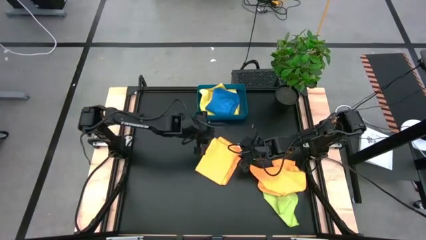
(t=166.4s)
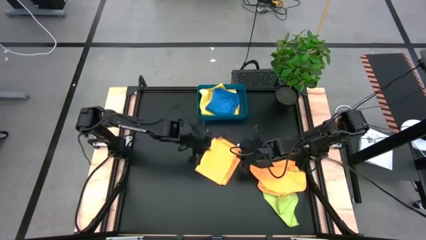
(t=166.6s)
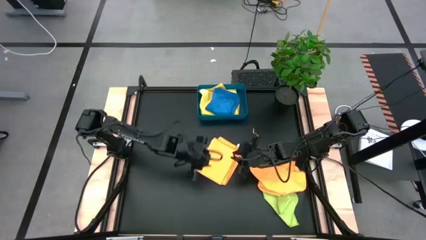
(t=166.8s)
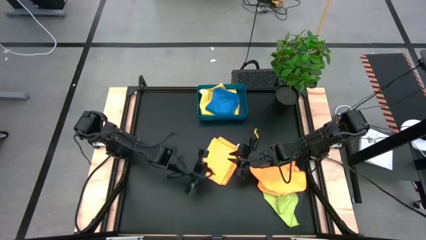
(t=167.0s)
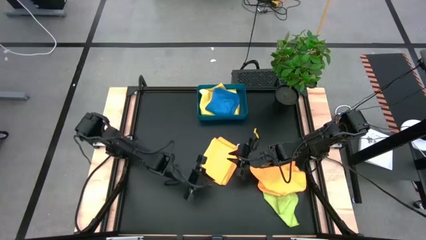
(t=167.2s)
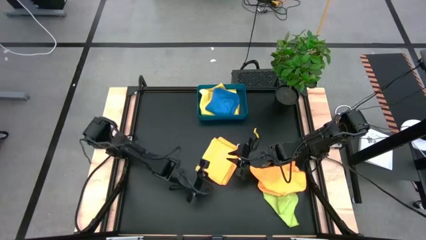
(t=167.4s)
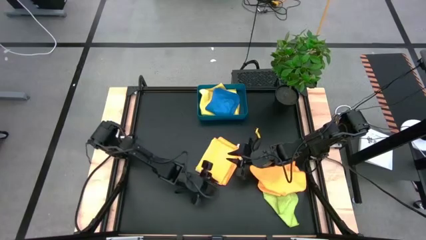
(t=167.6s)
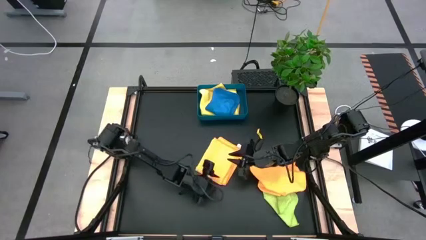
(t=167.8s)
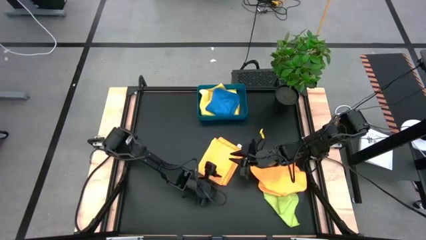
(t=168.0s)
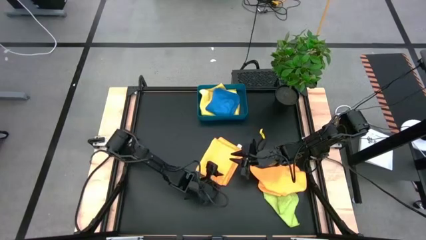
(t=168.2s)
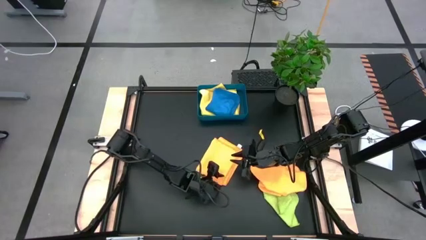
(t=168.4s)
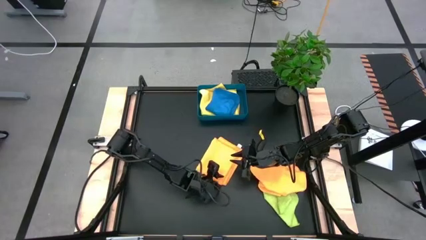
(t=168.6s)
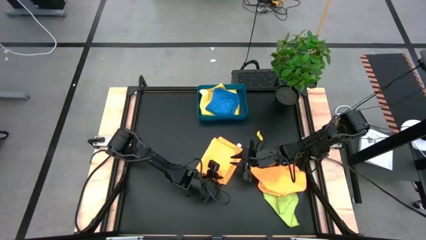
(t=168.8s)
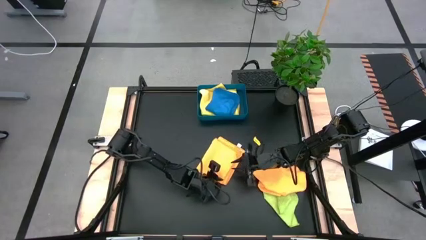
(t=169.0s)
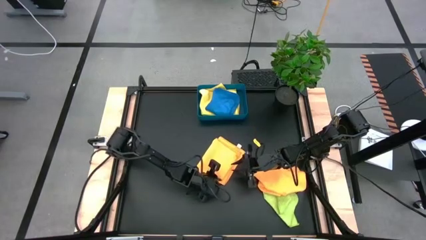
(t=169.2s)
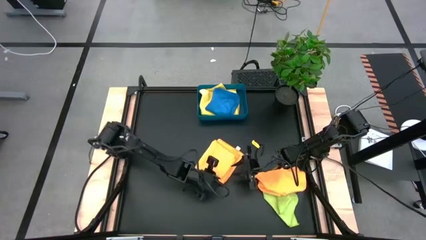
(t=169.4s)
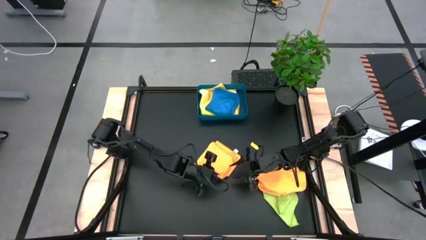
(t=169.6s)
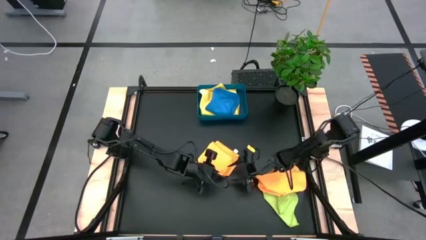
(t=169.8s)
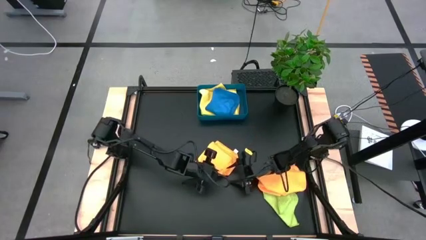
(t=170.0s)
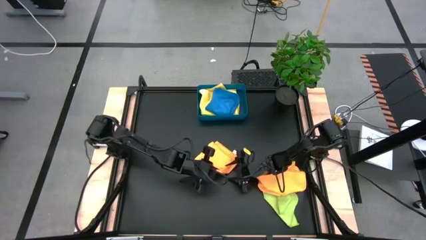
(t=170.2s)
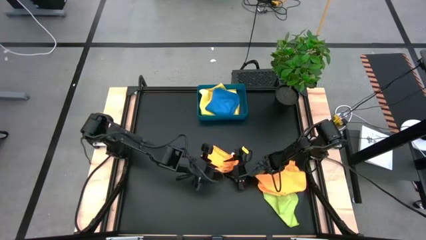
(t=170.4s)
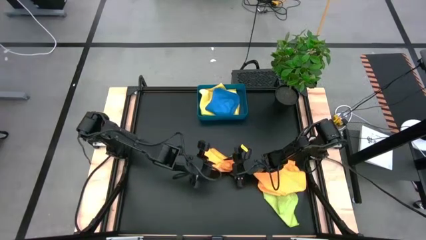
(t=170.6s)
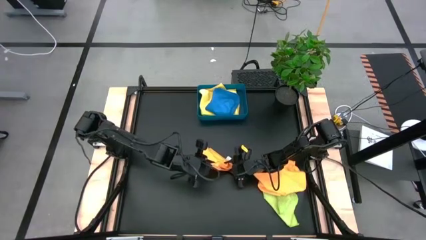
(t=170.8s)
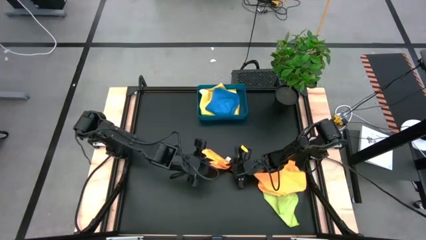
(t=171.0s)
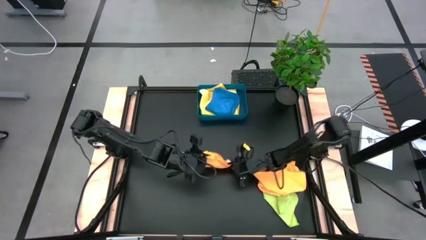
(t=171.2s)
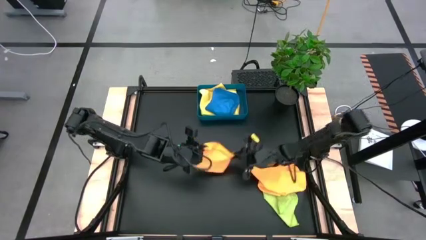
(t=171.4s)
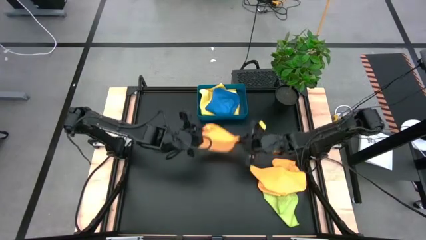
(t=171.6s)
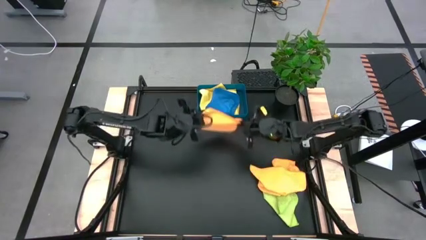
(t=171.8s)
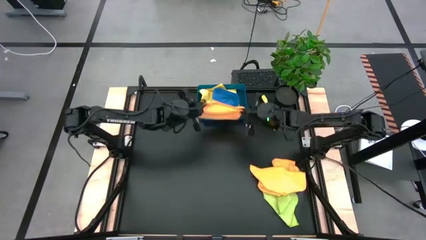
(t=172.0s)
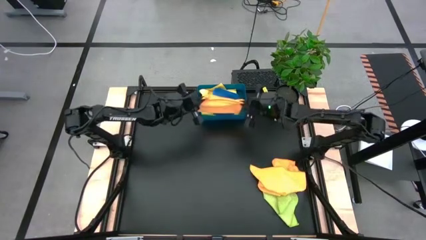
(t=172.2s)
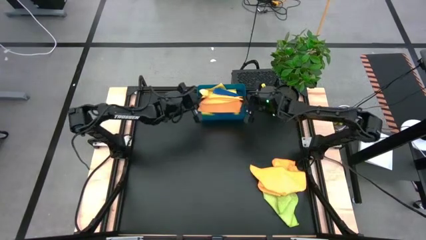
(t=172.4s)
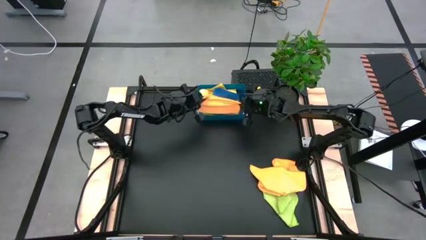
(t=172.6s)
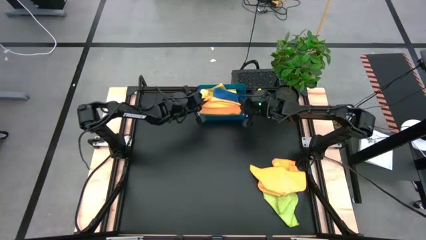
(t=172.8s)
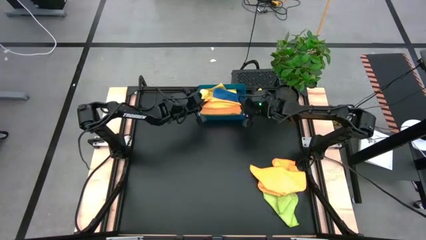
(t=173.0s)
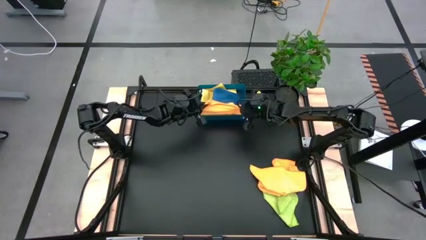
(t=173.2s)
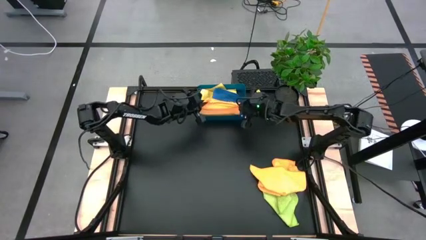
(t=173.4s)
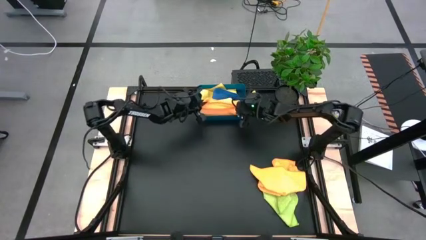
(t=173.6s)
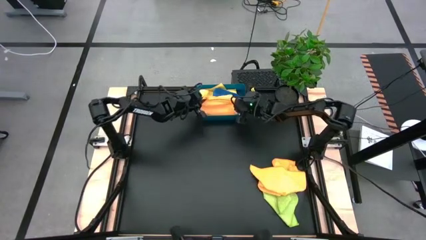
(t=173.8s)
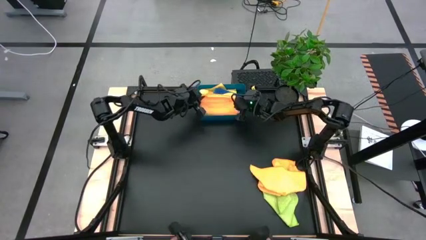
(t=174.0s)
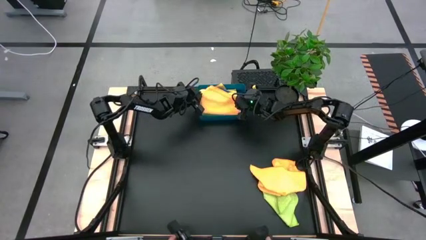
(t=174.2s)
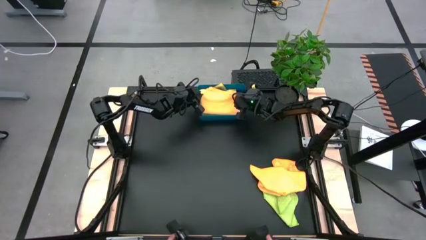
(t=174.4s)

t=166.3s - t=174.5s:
Task: Fold microfiber towels
Stack the left orange microfiber towel on top of the blue microfiber towel in the bin

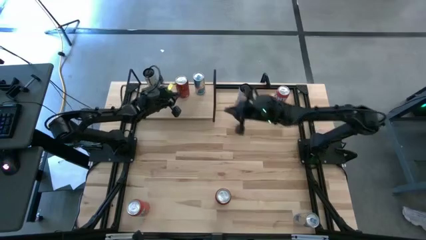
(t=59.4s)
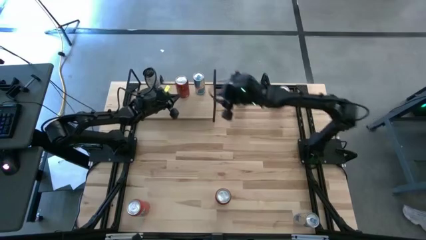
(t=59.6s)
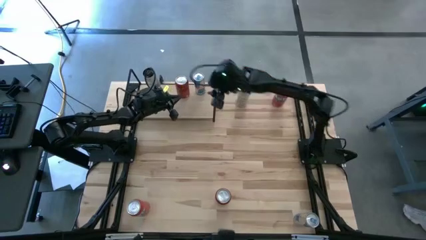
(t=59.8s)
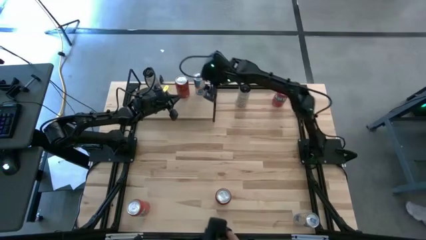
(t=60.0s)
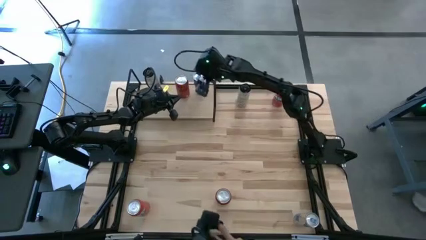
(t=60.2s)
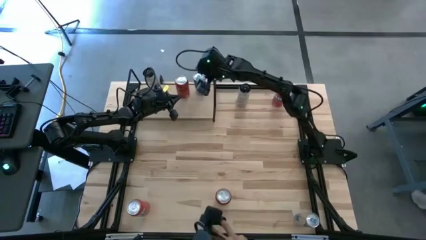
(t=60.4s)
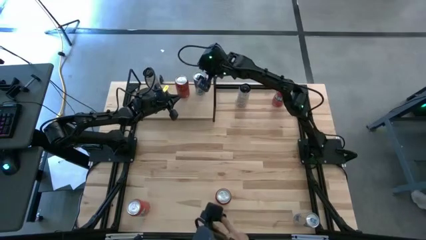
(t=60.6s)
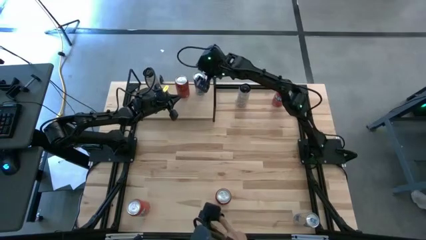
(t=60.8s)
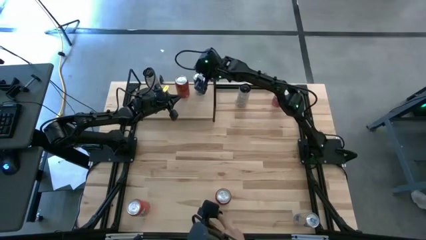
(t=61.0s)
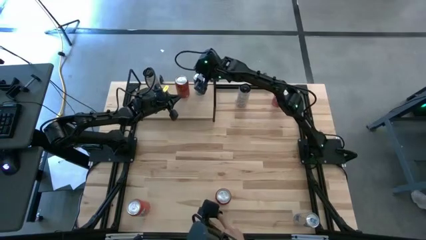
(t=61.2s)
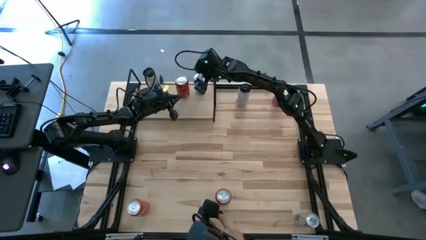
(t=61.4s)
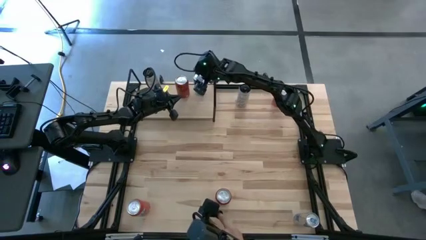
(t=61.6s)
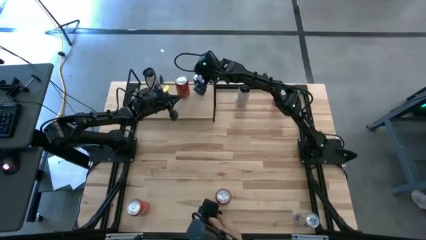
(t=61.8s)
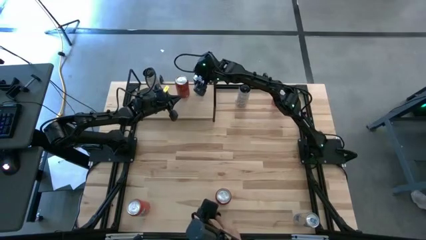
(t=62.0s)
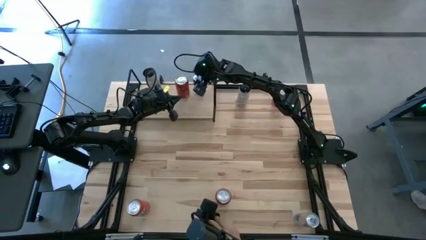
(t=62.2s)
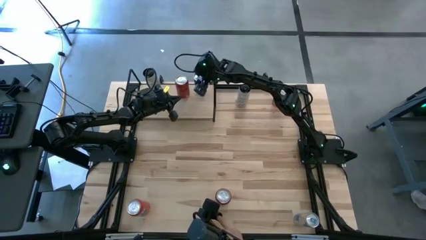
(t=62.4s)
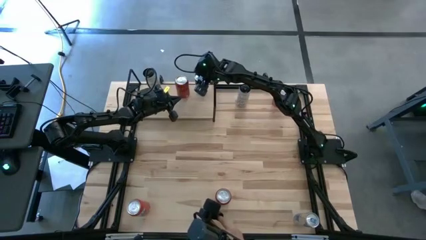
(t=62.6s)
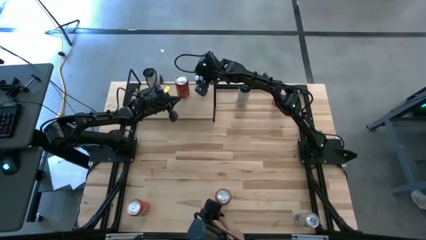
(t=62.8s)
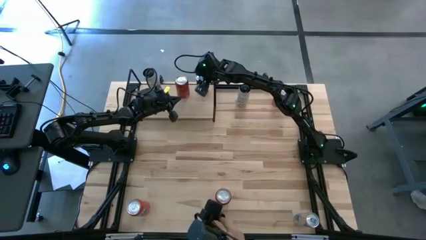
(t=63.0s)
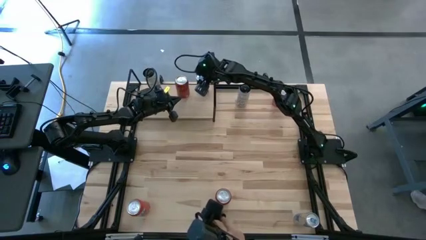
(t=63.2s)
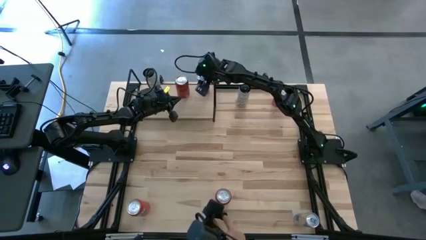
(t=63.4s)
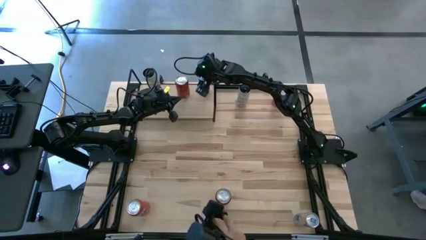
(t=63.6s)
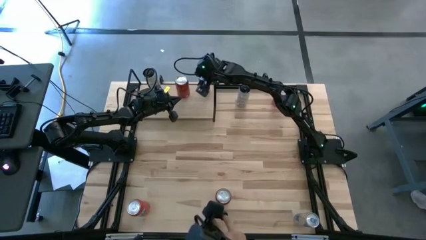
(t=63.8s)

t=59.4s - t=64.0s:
Task: Place canned beverage on shelf
Adjust the blue soda can on the shelf

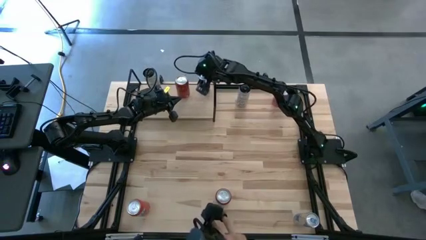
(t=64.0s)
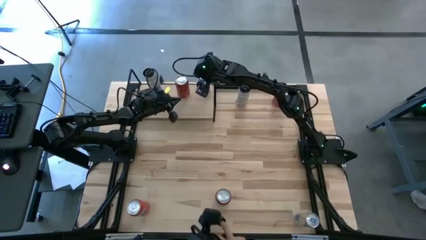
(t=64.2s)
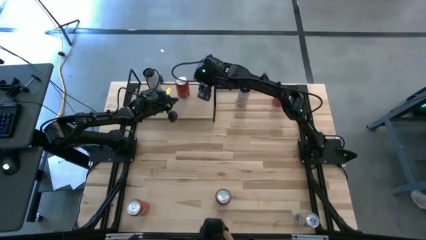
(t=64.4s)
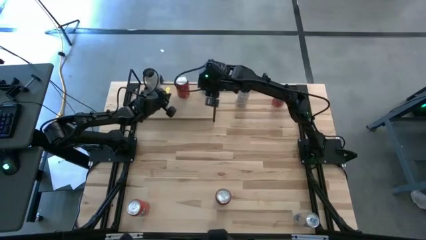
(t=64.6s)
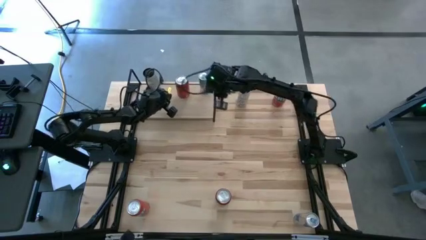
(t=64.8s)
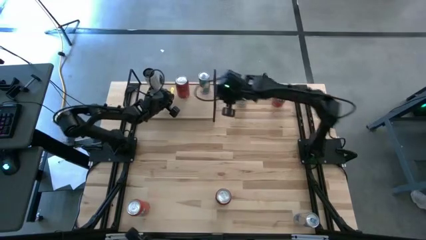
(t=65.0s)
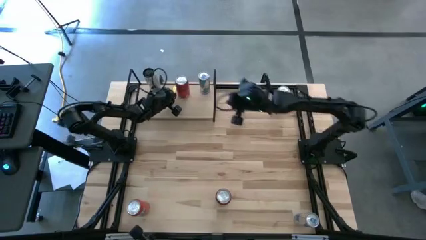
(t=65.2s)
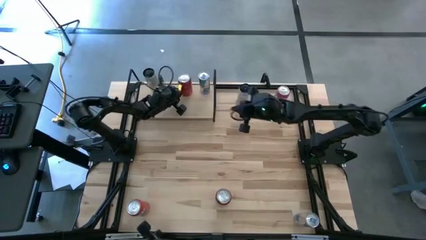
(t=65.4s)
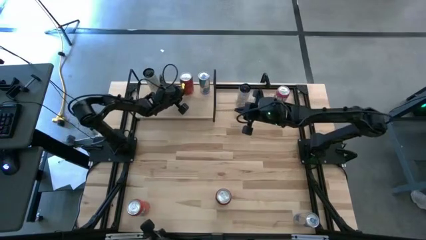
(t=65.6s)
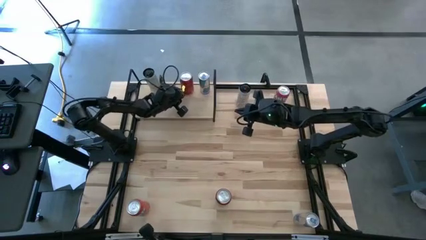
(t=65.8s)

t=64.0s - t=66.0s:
Adjust the red soda can on the shelf
